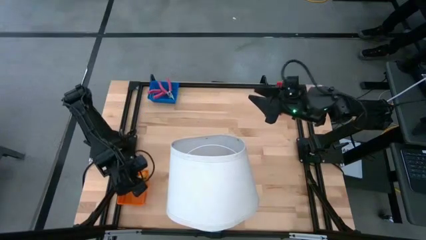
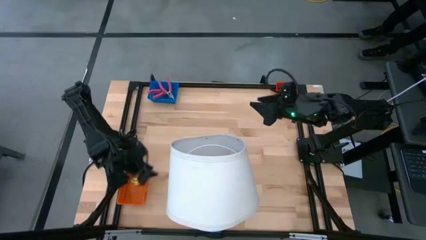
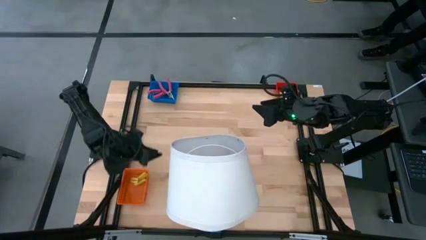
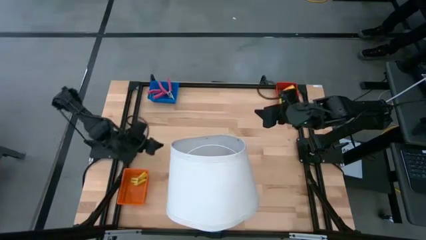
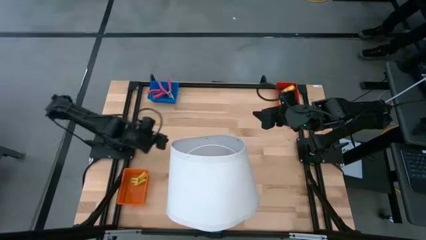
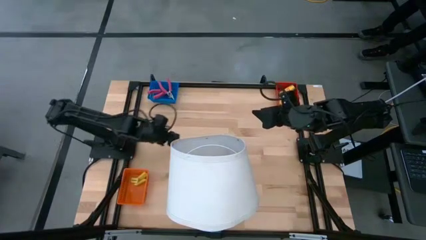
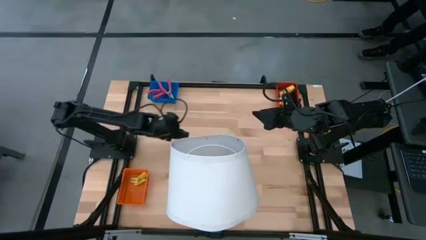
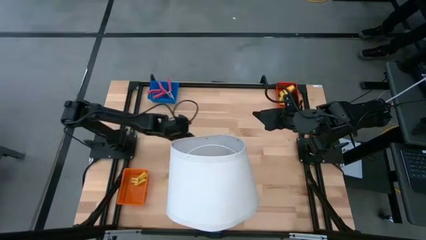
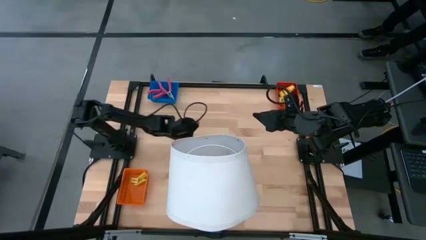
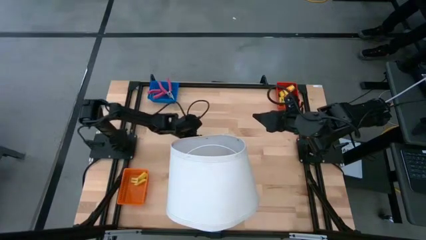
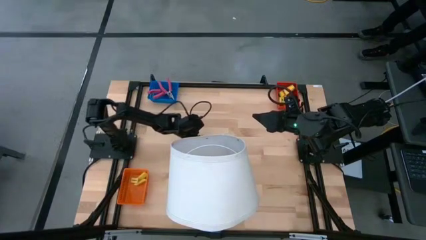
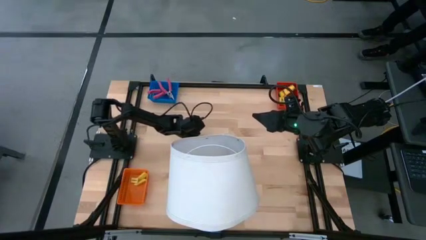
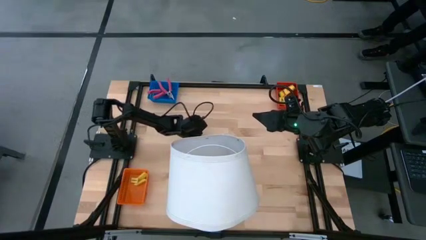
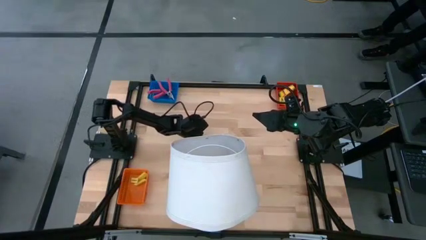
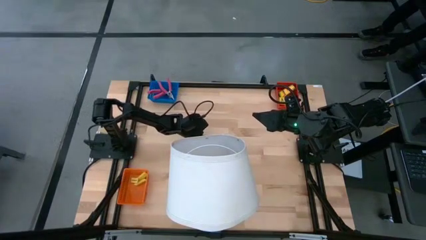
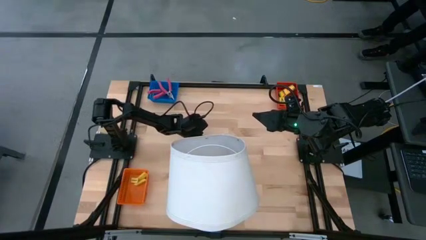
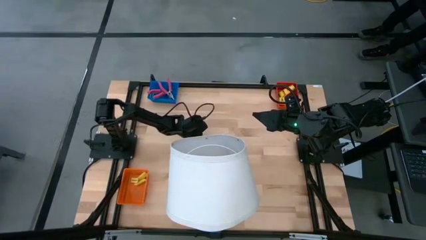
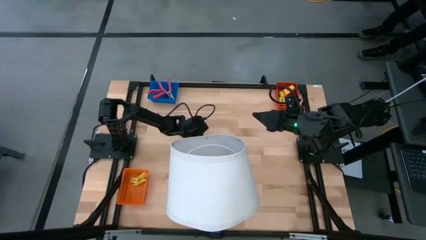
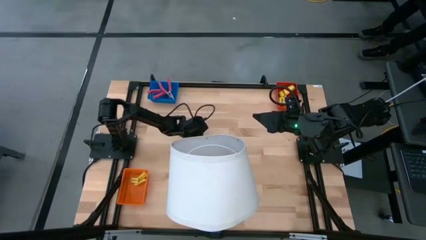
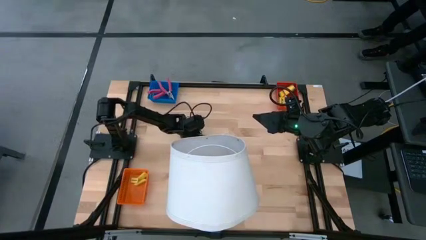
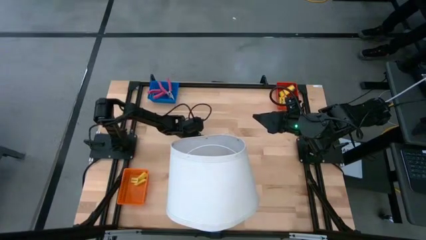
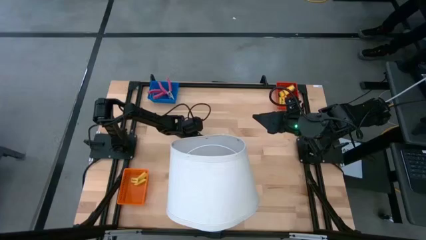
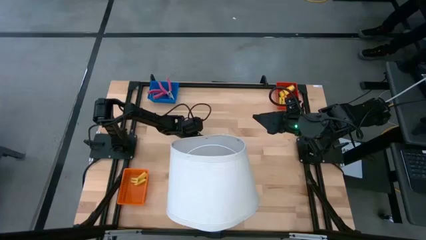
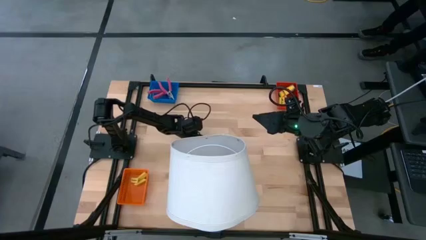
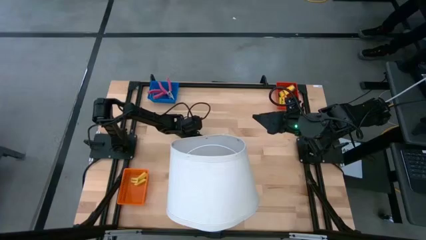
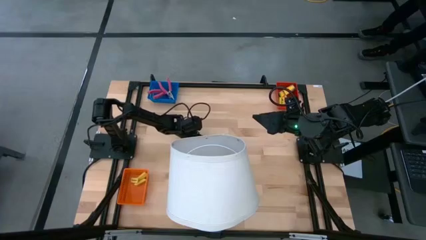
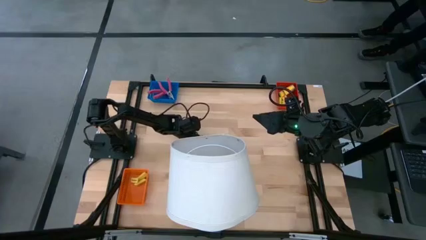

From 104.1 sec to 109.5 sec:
Task: Pick & Place School Supplies
Put the yellow eraser into the orange basket

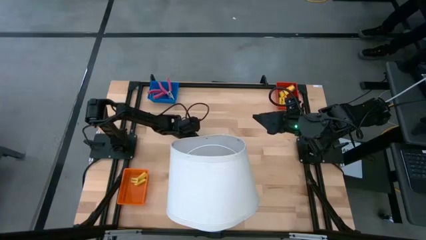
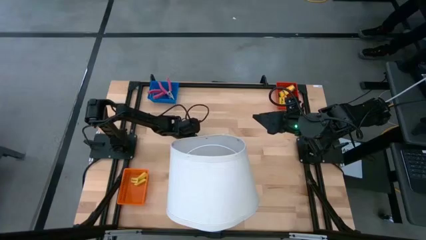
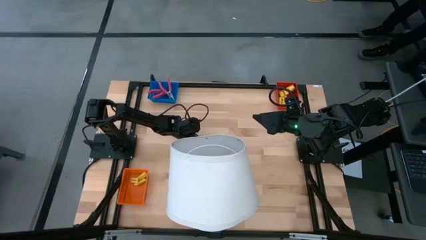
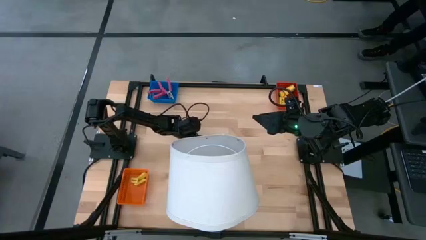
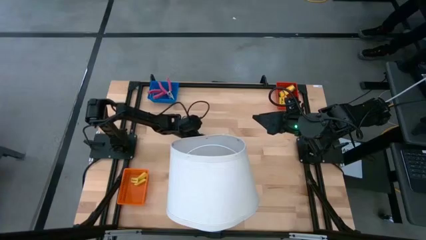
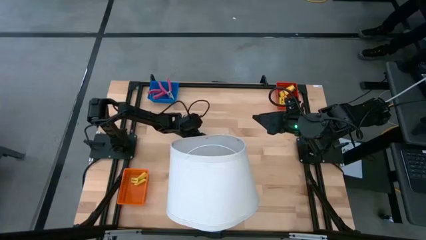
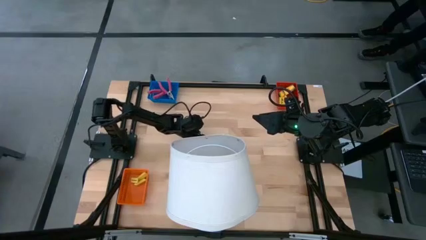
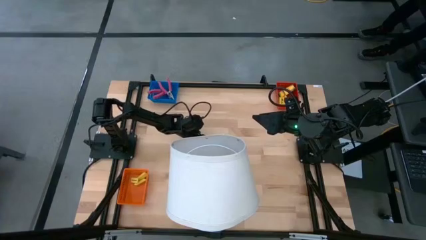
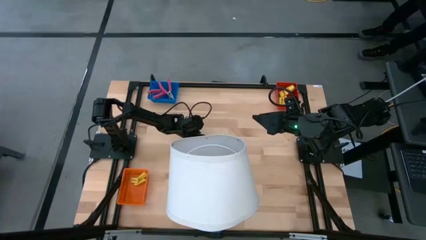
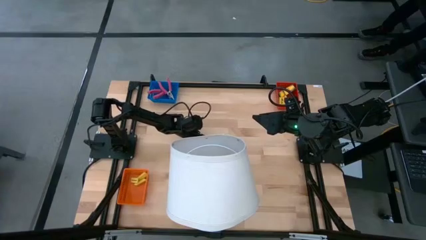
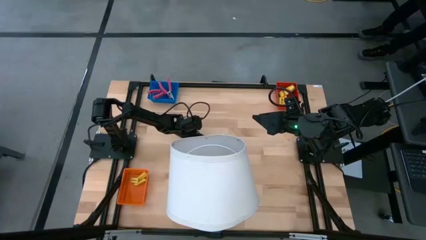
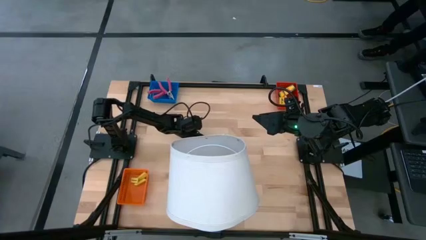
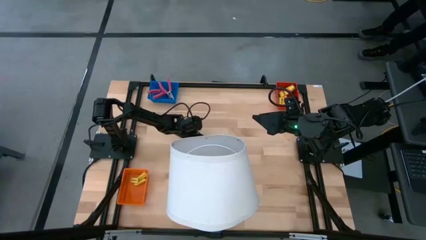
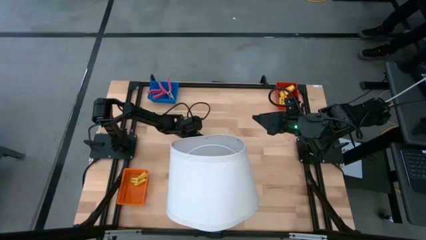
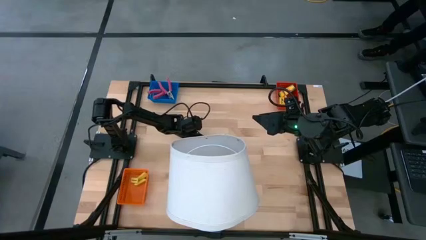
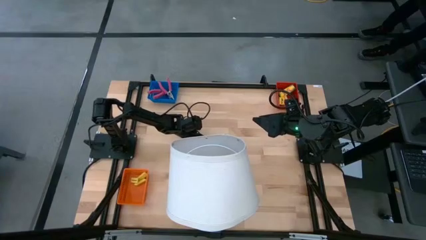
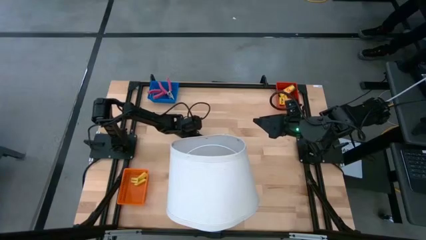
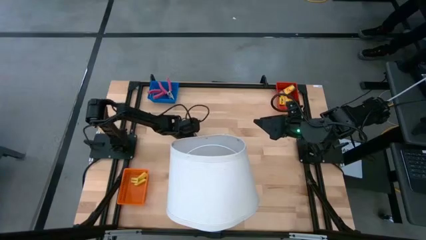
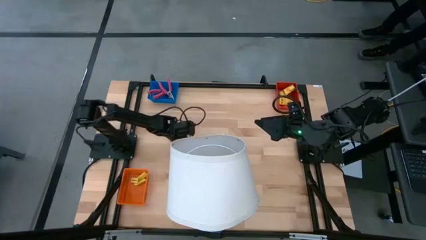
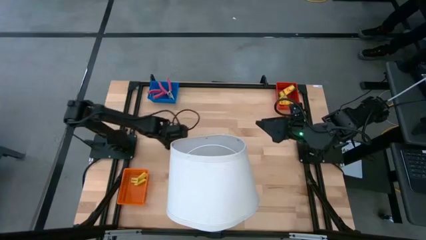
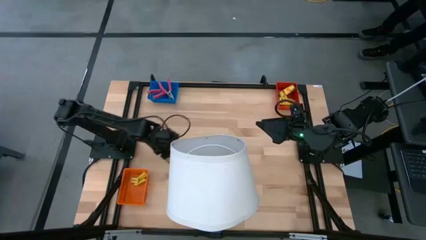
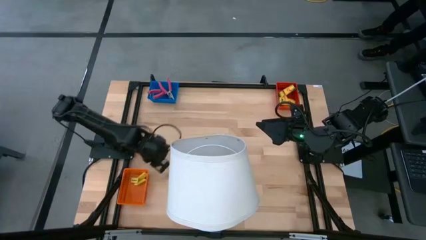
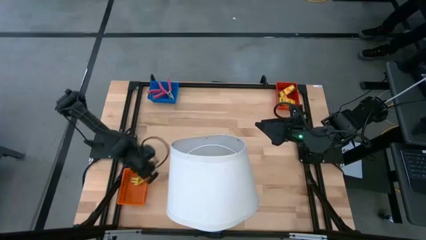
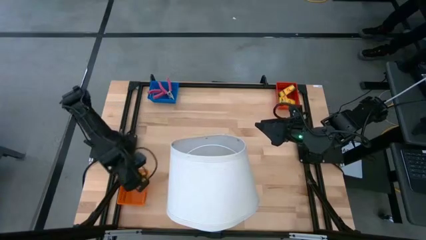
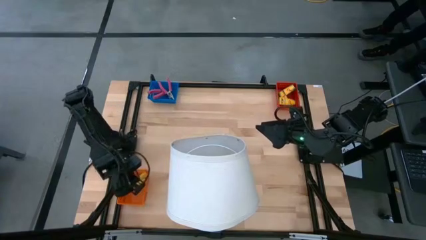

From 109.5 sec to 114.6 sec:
Put the yellow eraser into the orange basket

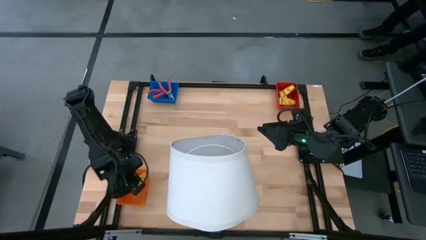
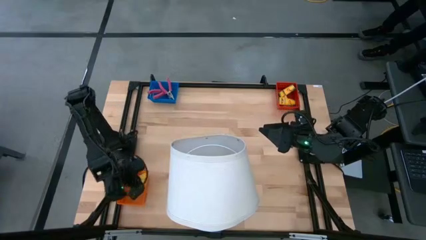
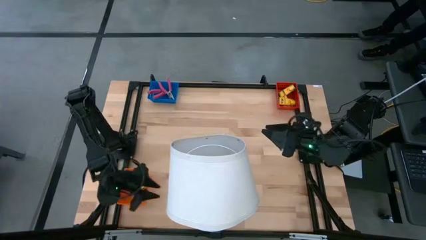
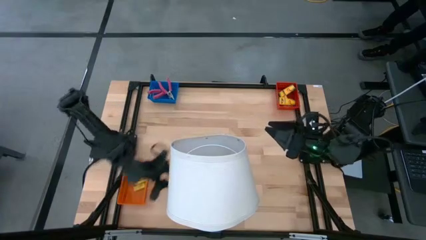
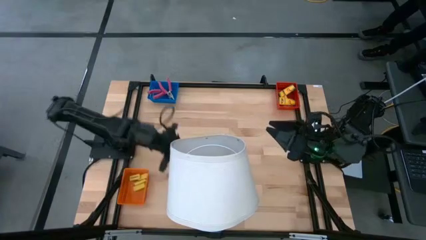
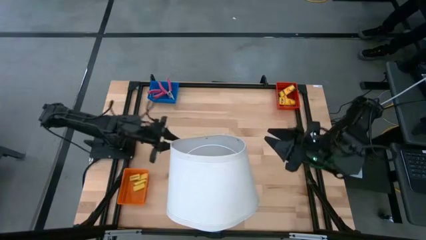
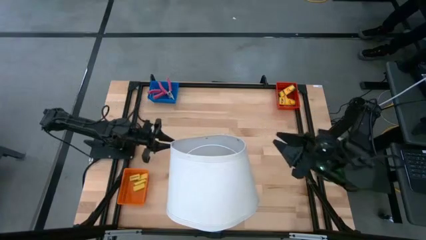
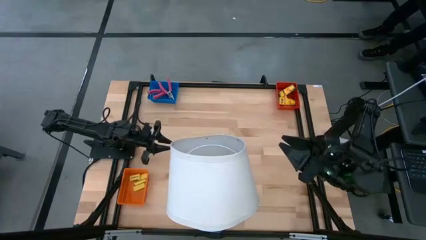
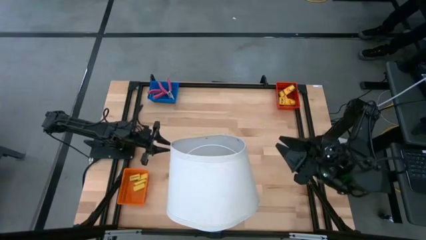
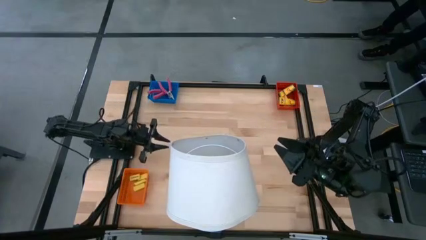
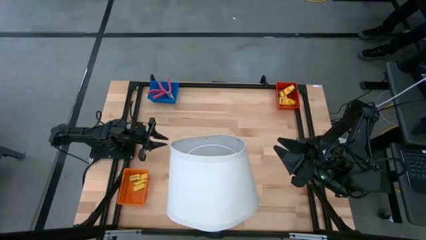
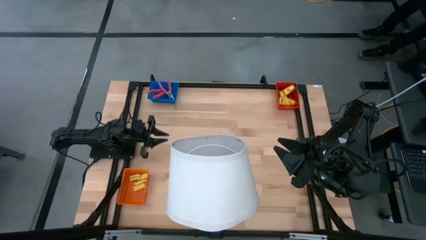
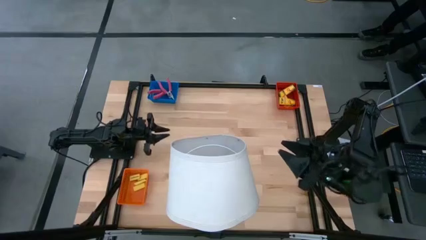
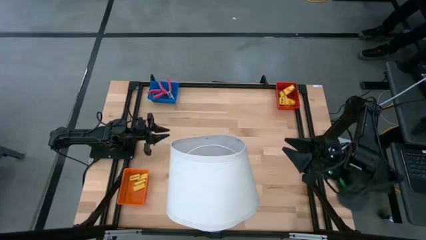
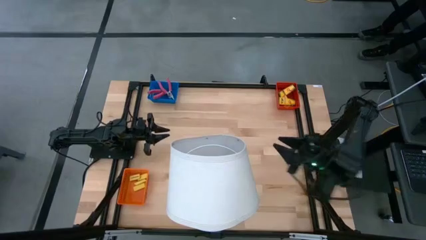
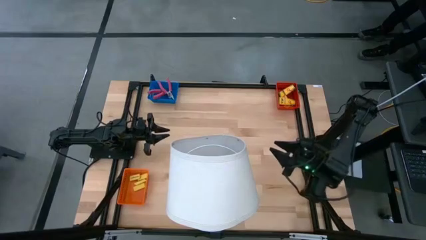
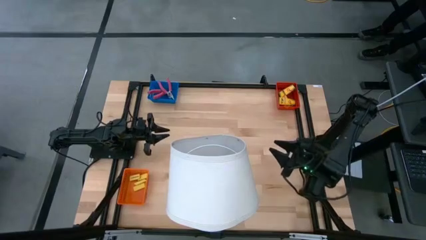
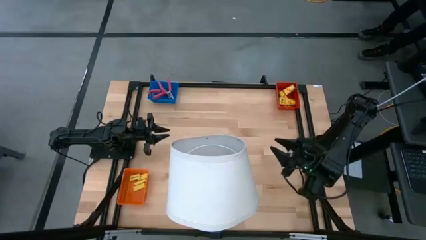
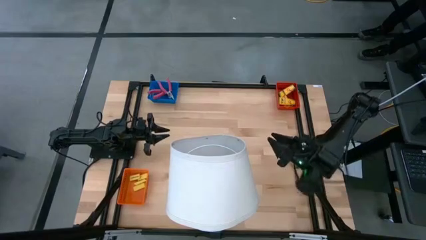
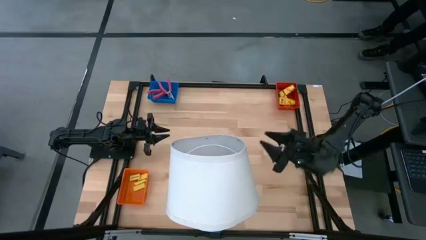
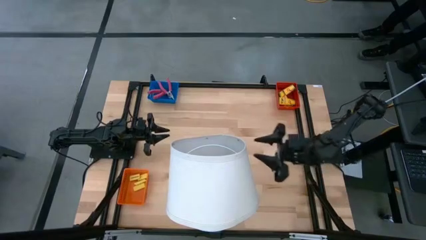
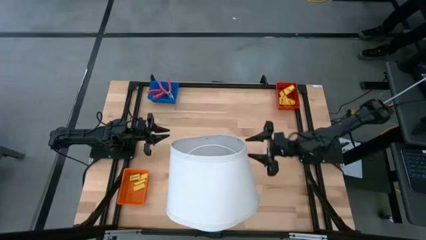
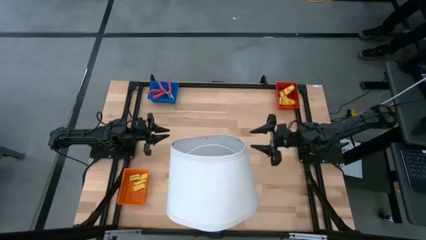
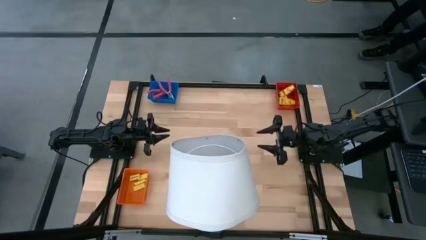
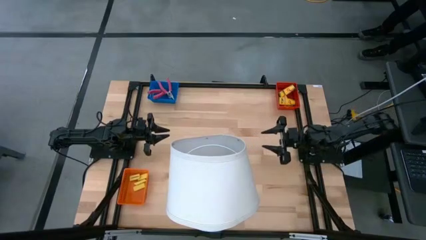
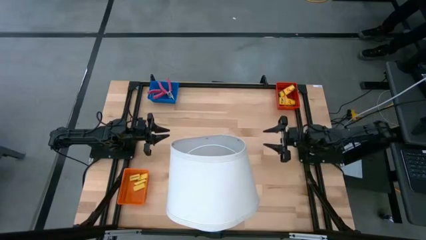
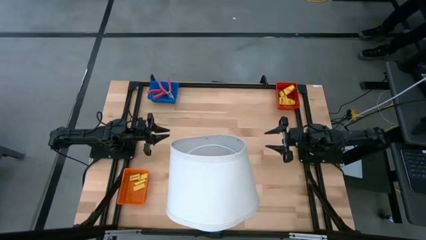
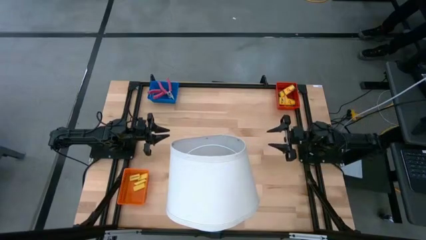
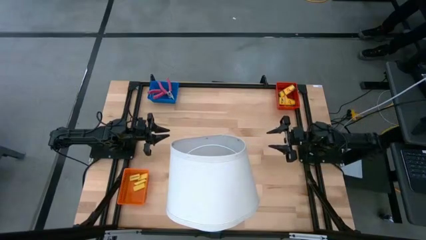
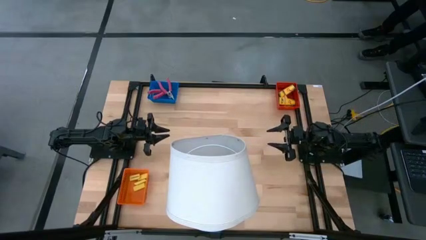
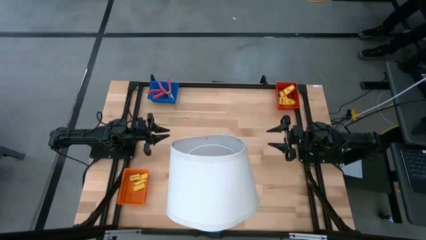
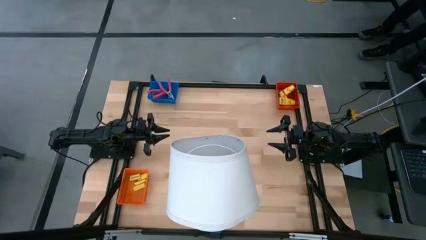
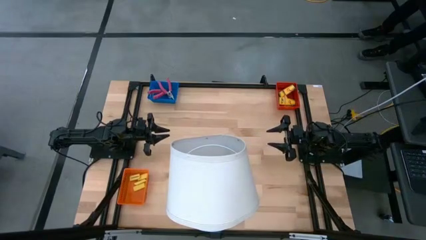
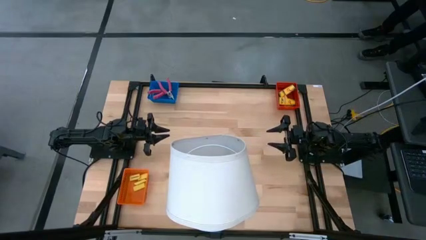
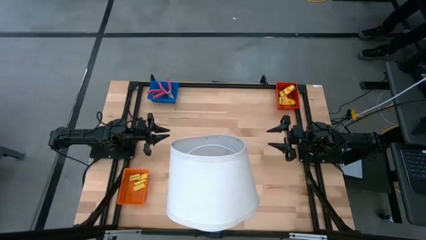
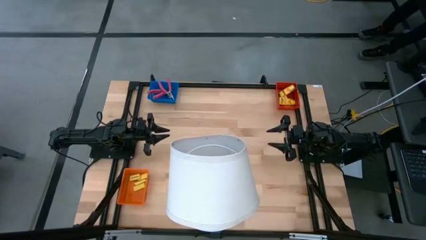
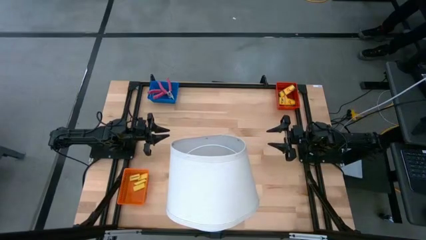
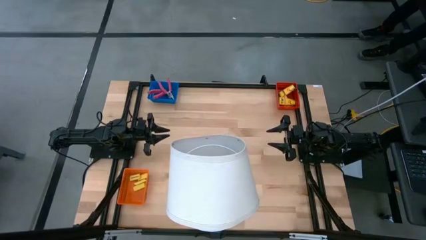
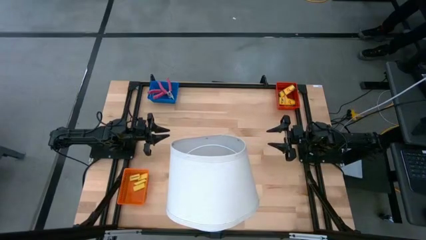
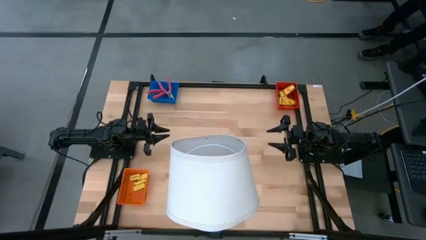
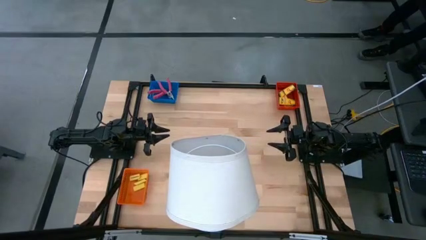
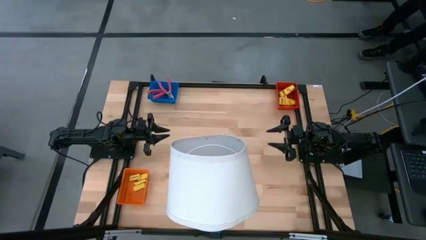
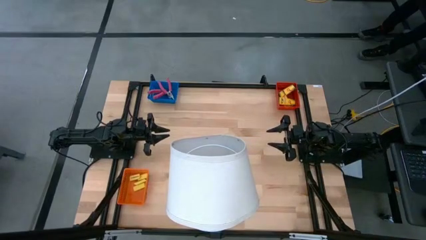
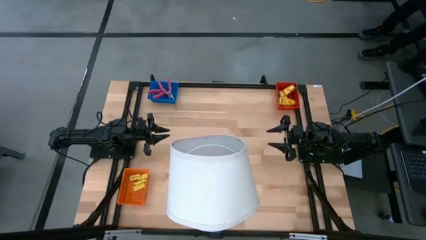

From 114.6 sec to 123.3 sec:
Return to Home Position
